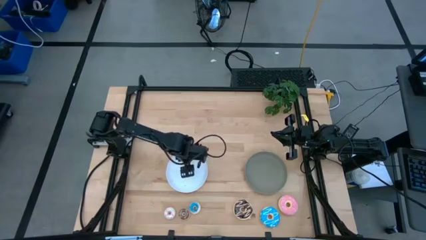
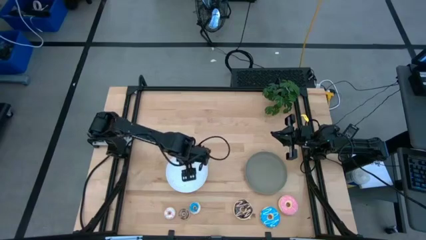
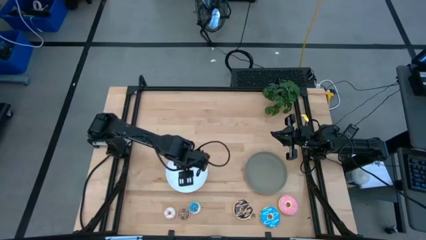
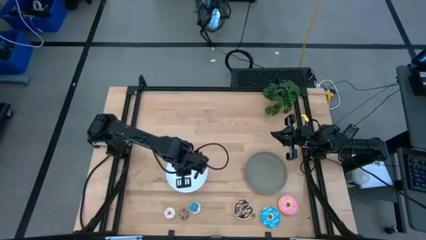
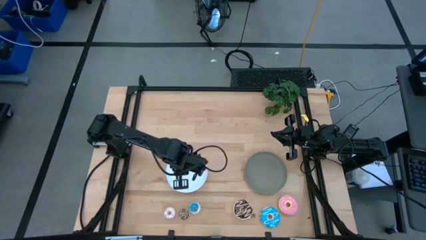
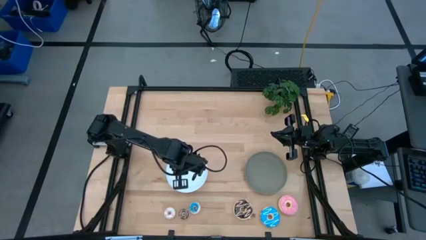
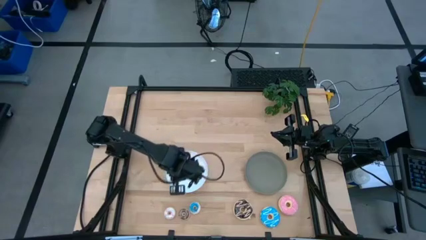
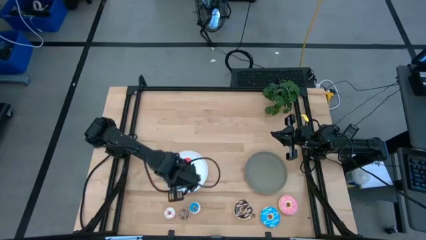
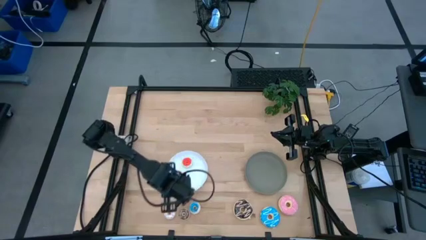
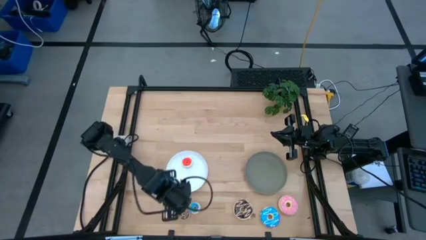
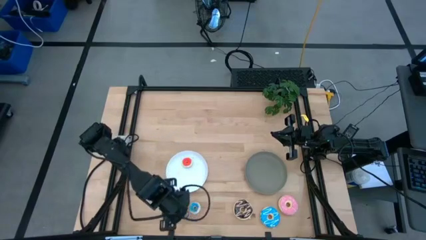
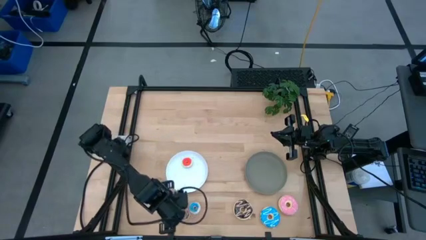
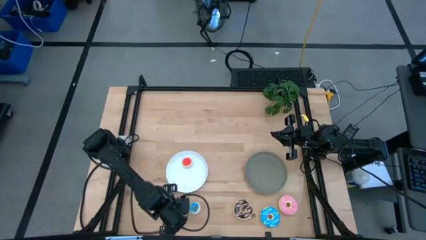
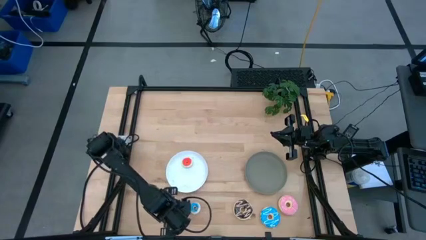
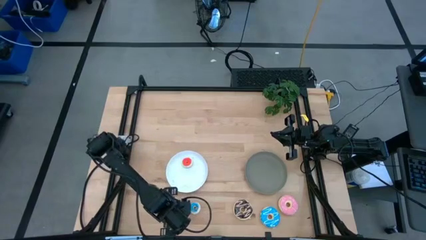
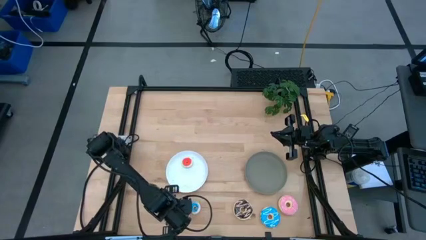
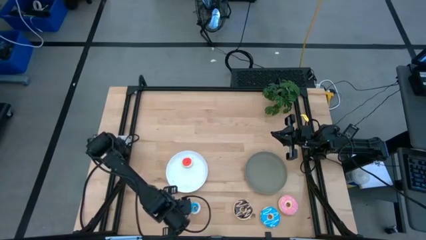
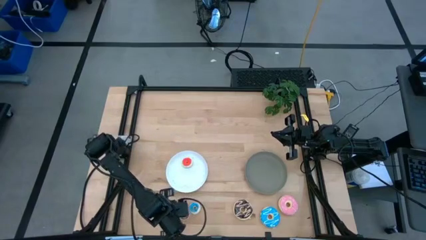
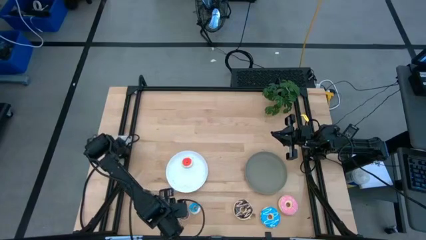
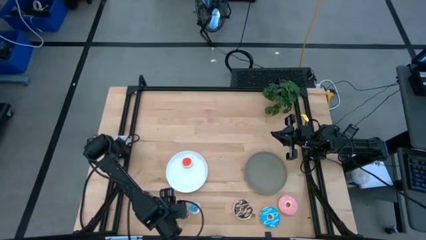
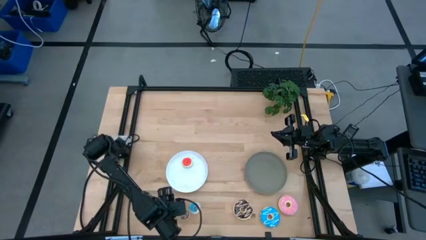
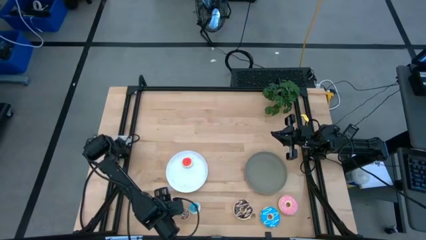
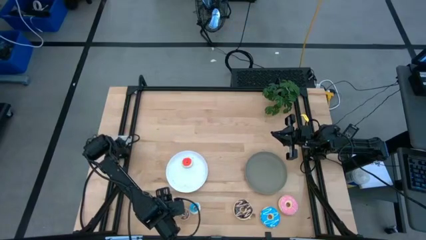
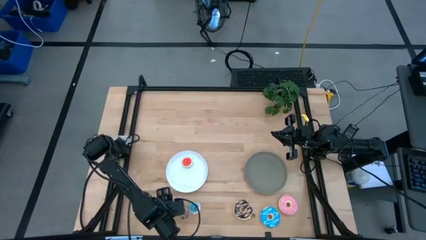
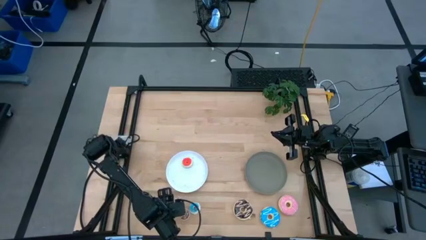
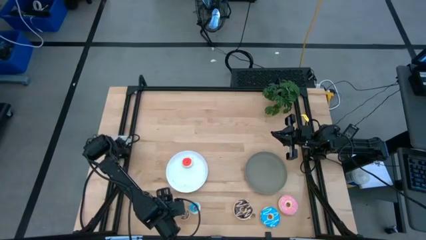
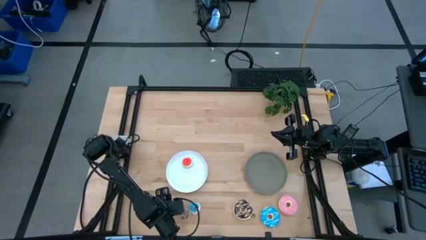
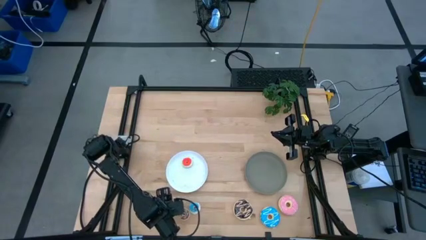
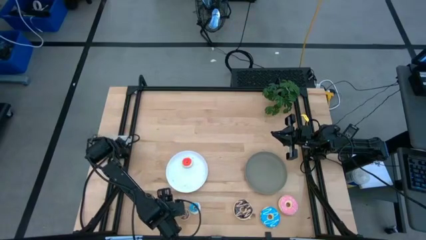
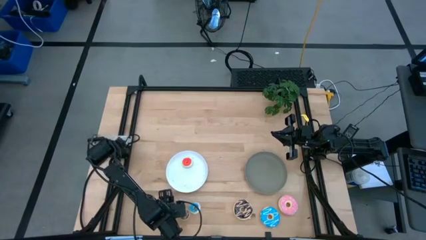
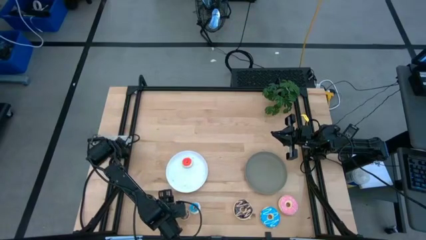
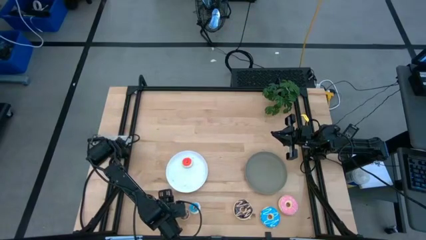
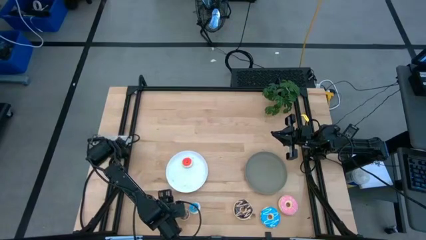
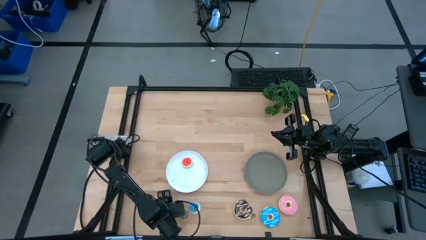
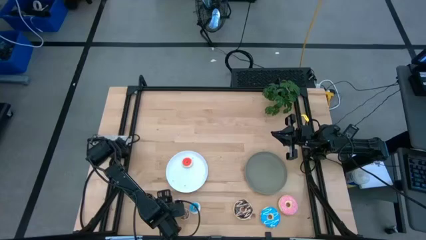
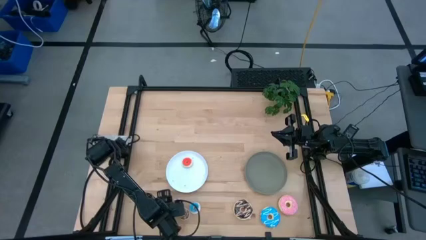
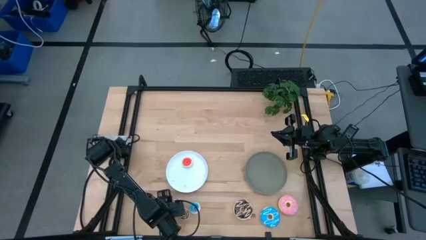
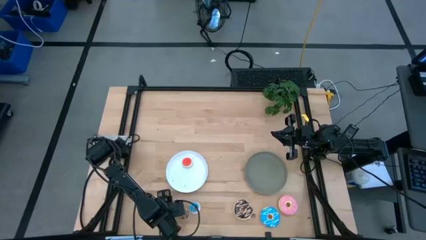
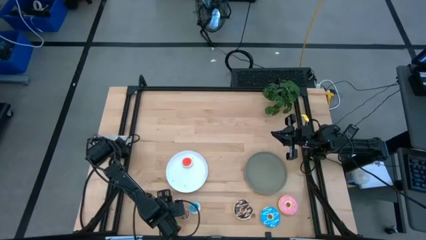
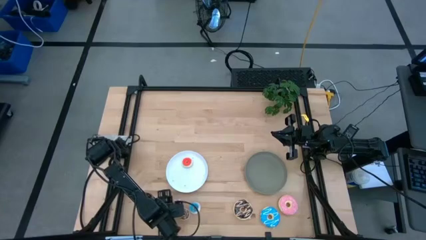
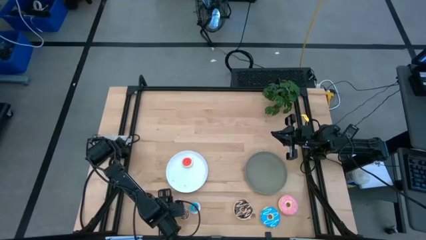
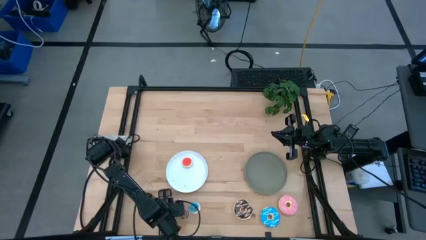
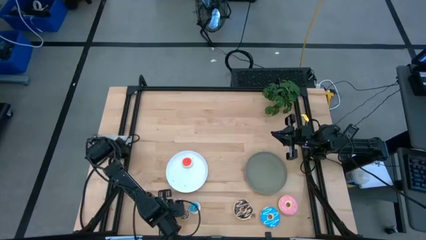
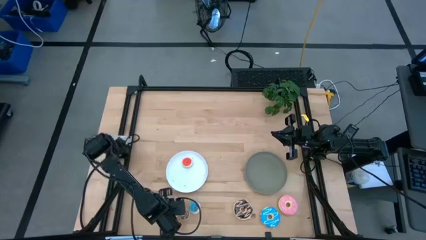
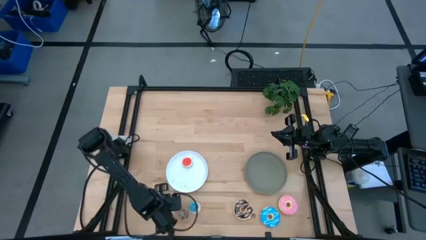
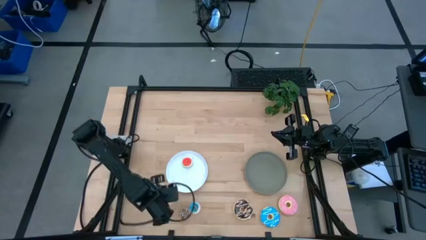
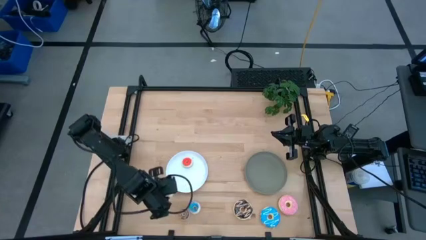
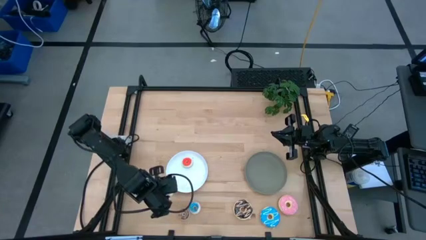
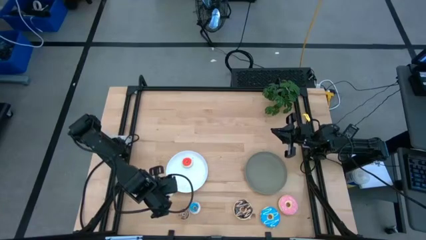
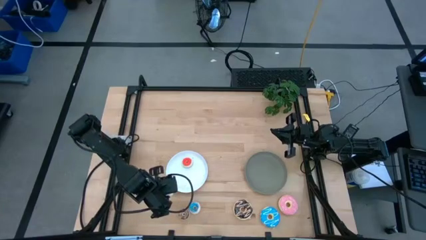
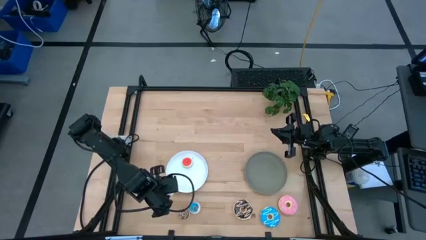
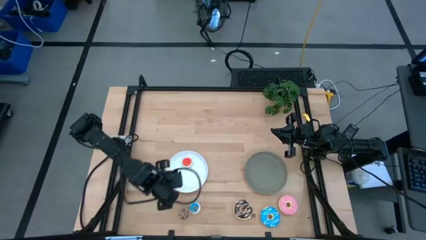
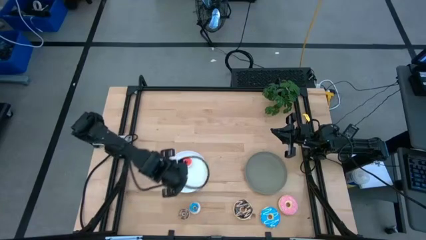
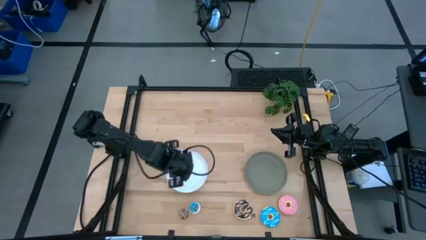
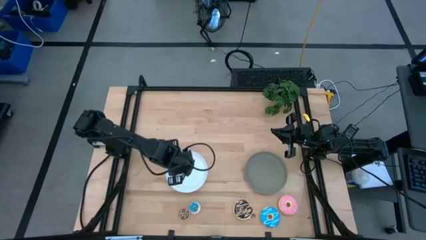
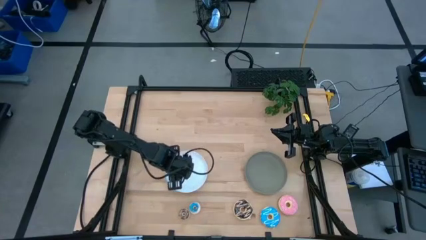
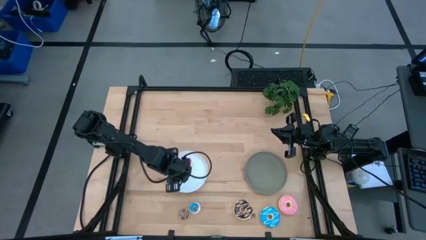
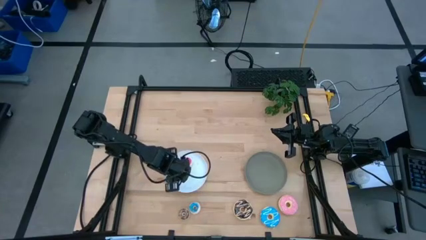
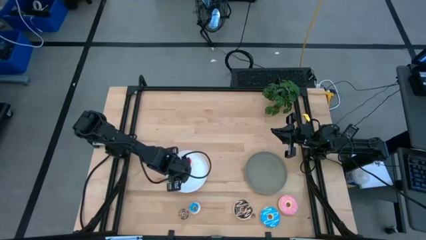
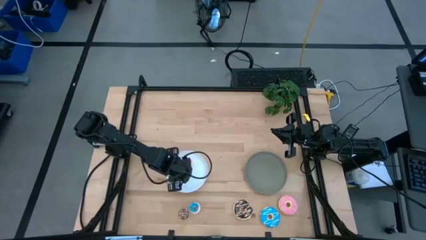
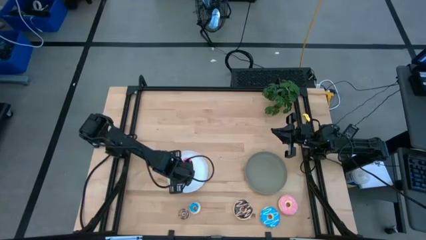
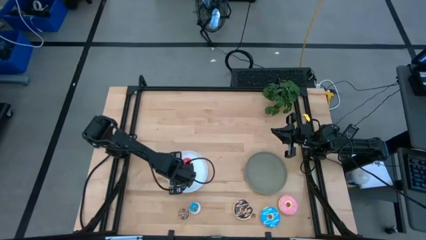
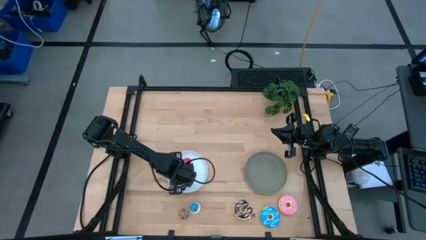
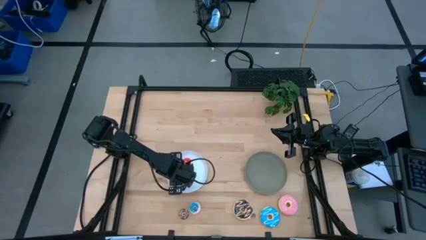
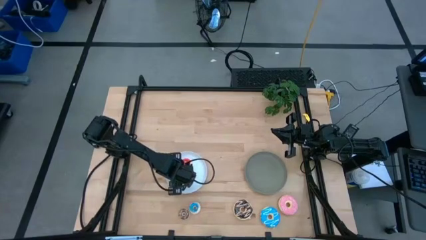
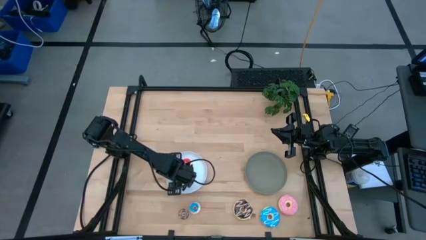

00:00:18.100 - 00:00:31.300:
Task: Pick & Place donuts
Put the small white donut on the white plate
